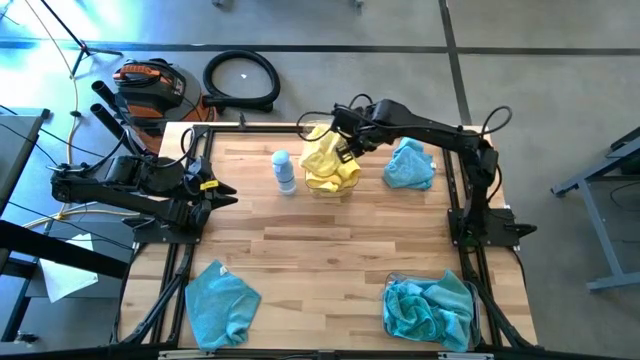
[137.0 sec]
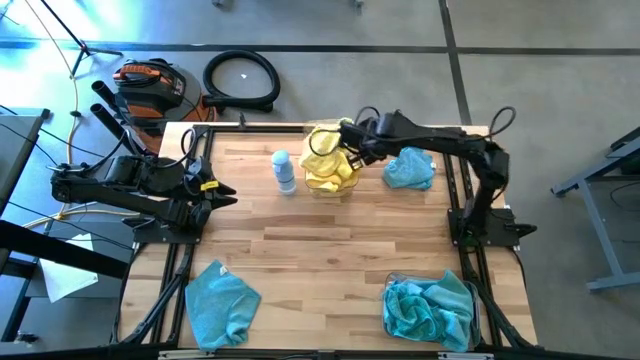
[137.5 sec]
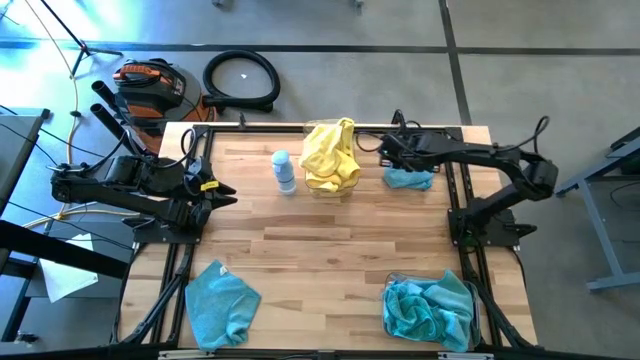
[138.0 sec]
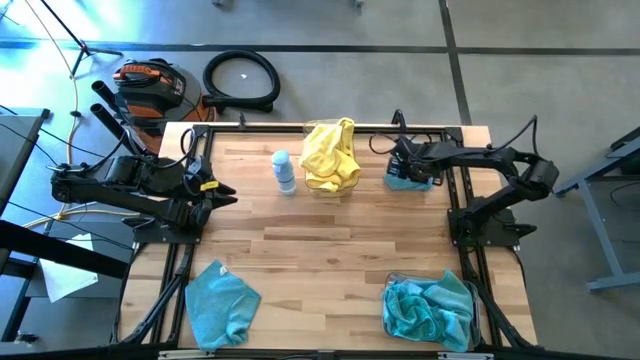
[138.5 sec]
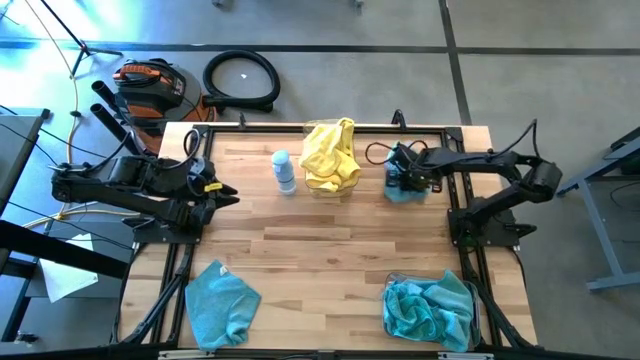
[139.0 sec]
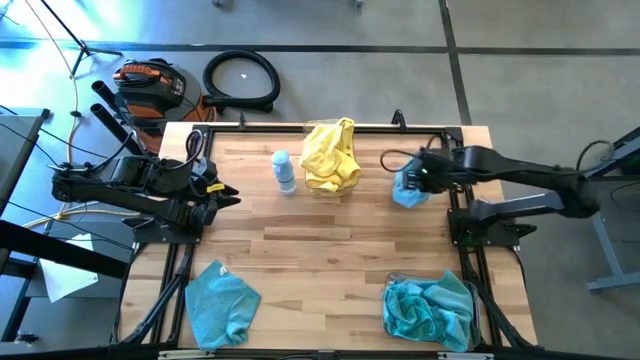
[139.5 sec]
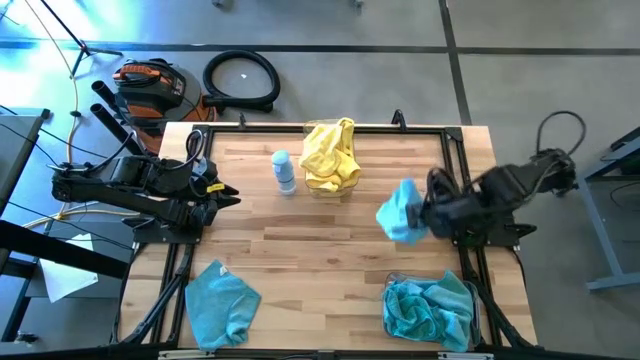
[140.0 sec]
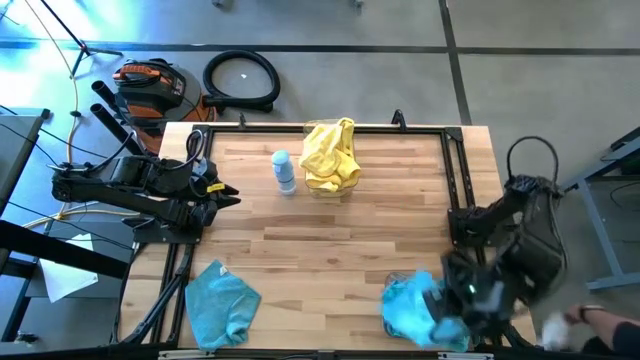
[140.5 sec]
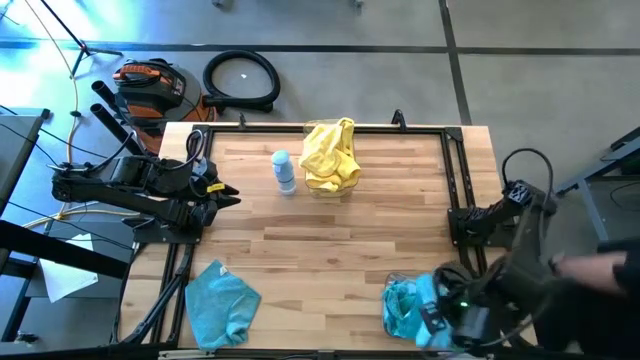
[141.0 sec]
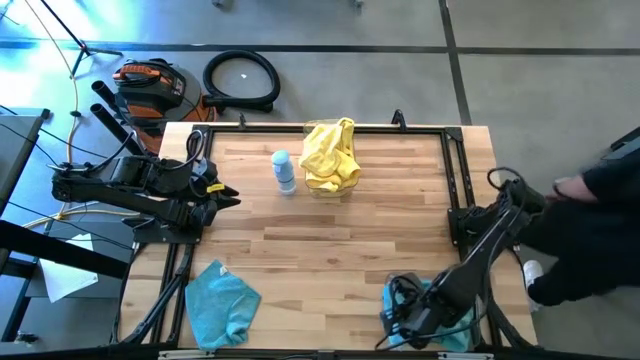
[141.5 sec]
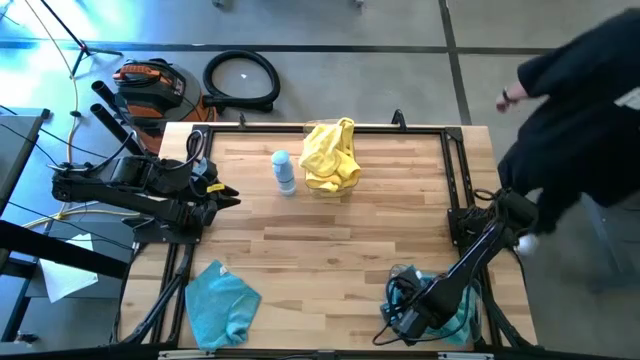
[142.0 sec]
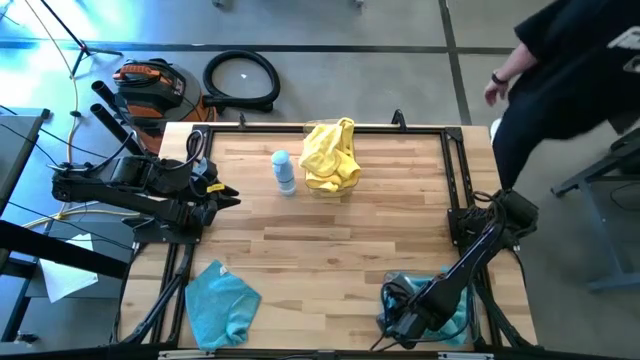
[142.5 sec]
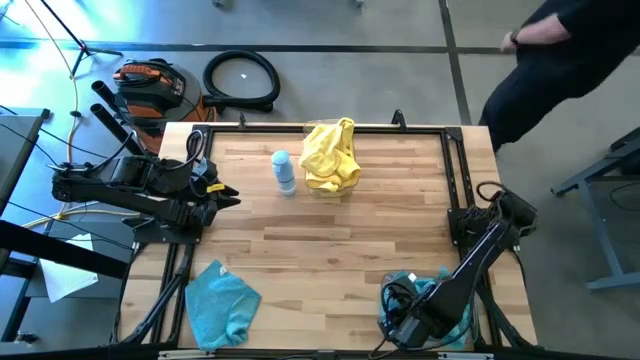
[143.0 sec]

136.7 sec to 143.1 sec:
Task: Sort microfiber towel by color & place in baskets
Put the blue towel into the bottom transparent bin

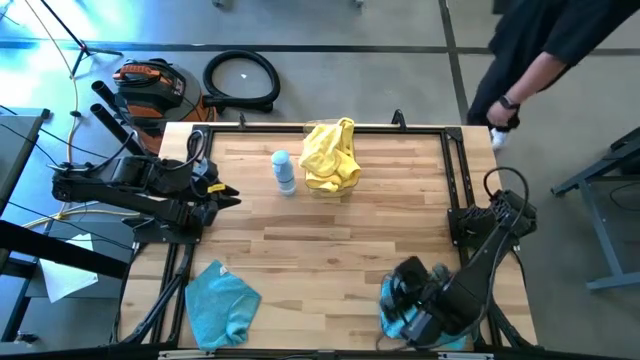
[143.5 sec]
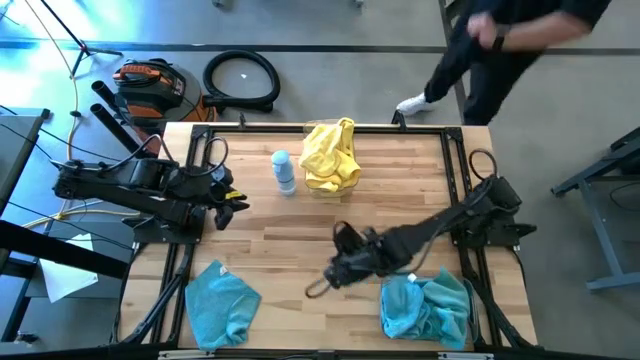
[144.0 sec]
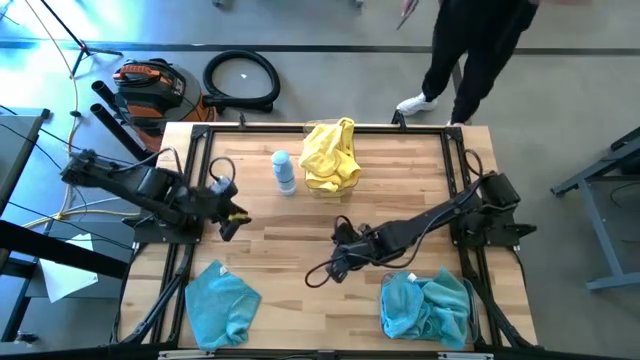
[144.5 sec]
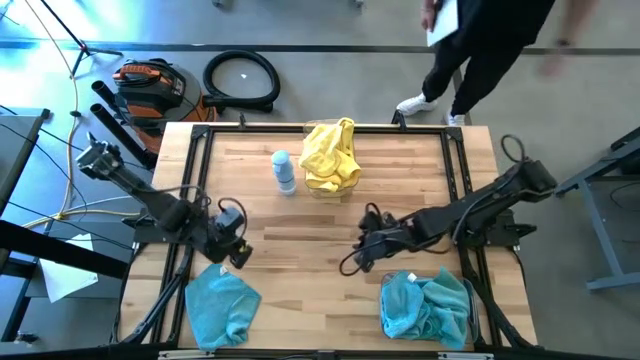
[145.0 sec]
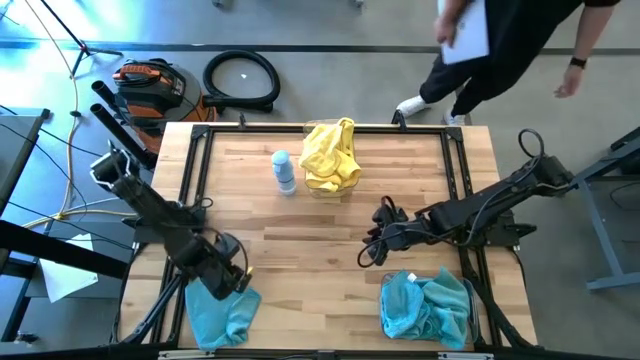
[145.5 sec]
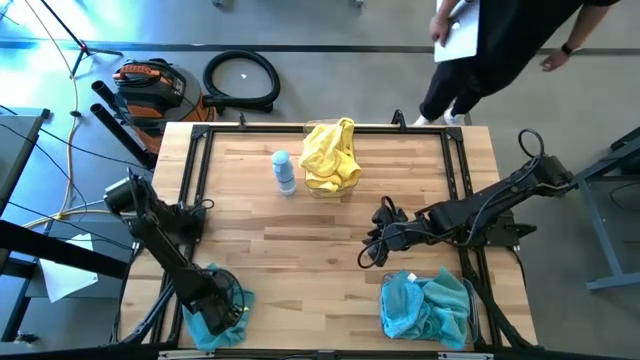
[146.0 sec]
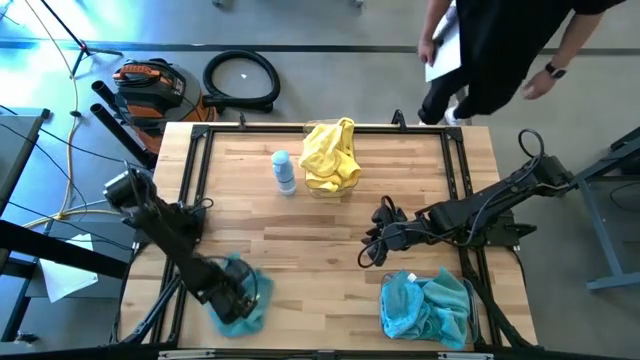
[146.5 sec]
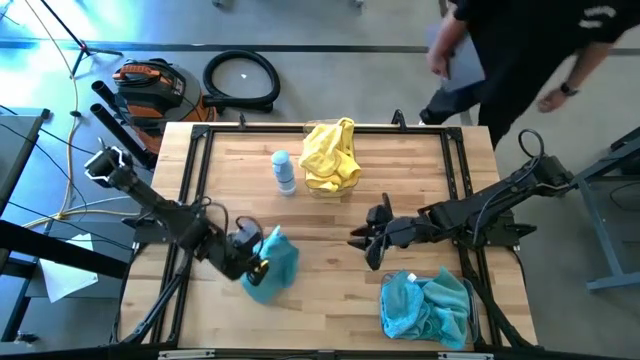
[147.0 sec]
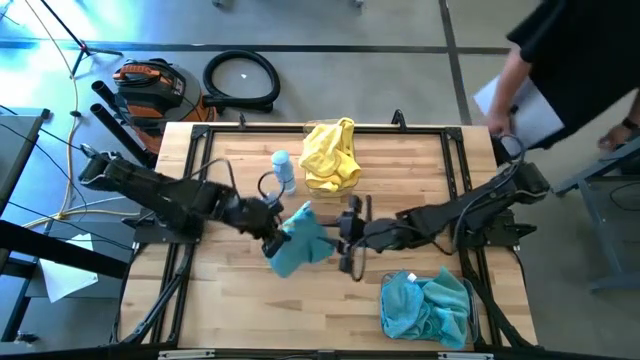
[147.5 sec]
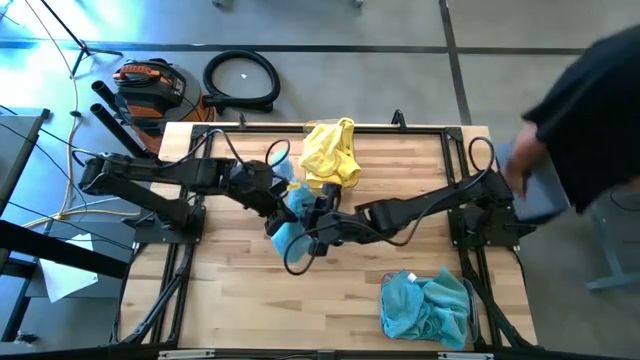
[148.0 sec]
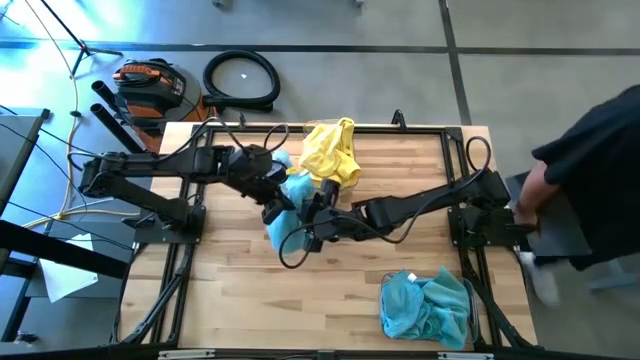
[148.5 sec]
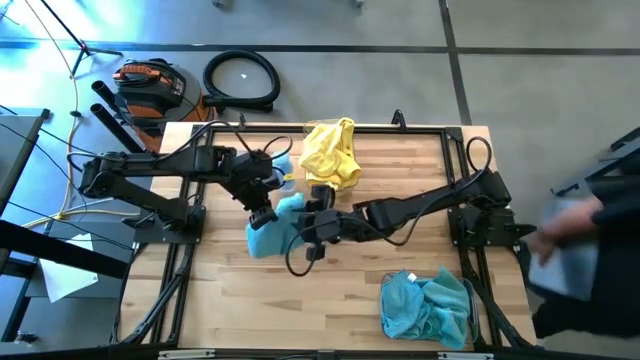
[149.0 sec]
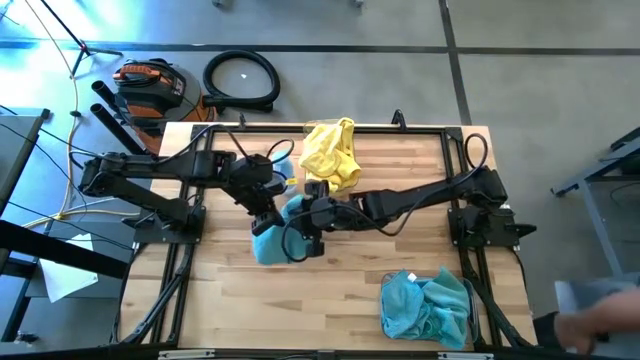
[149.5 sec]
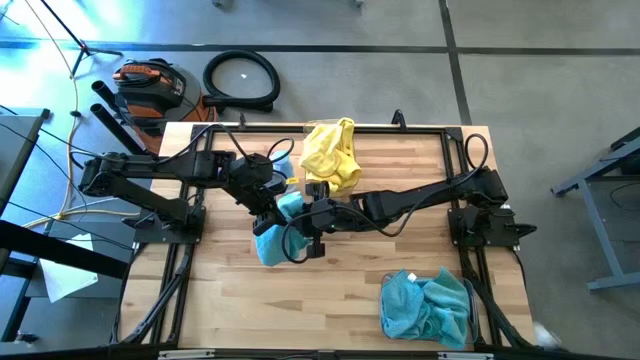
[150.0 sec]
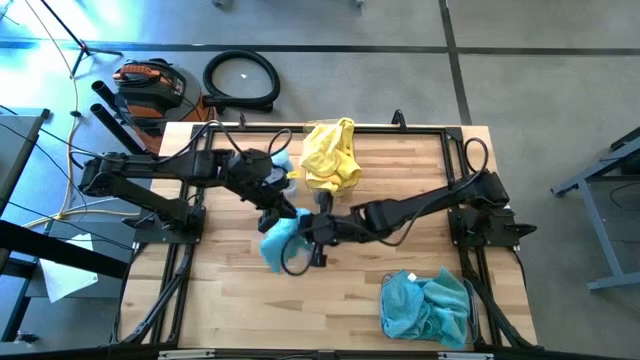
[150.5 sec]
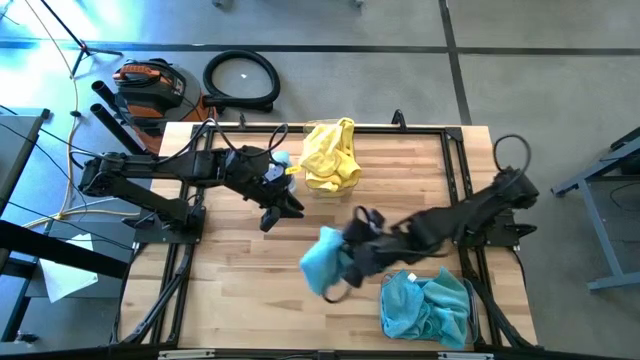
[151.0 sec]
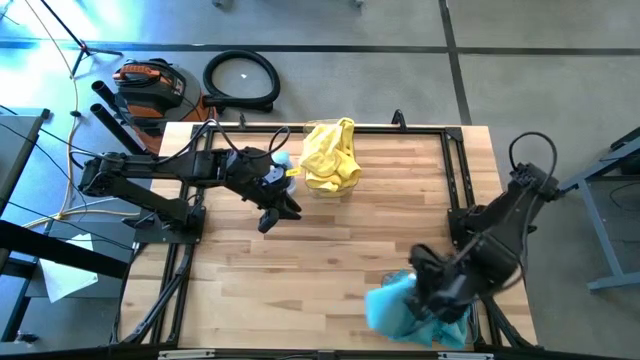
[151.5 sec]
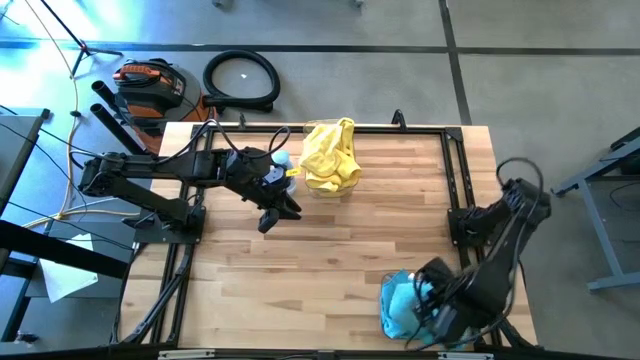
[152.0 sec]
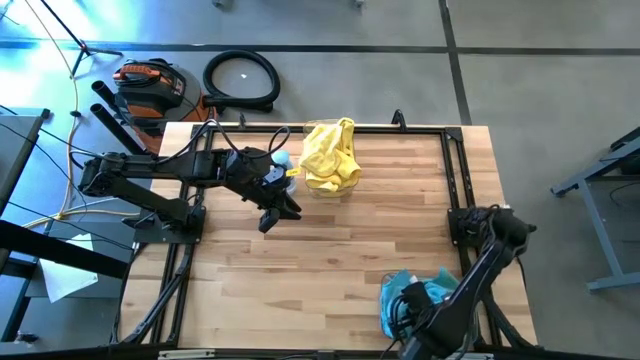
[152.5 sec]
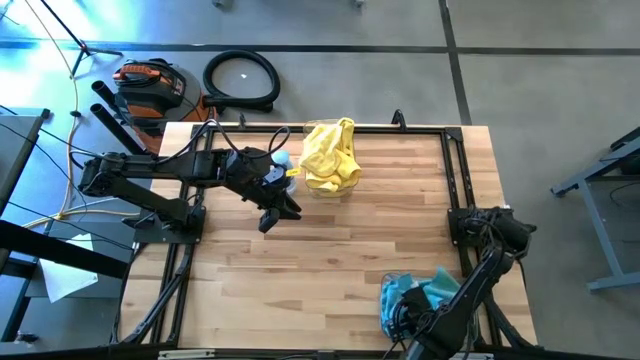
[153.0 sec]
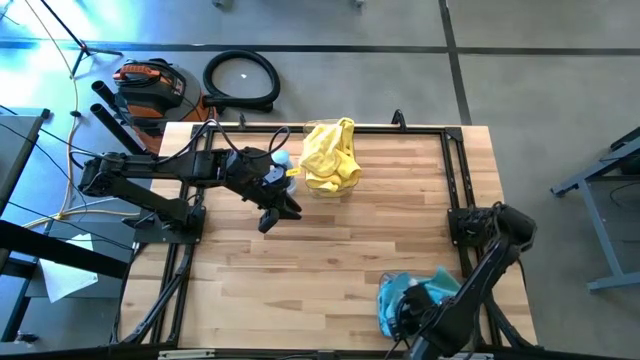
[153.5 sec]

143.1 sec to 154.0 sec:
Put the blue towel into the bottom transparent bin

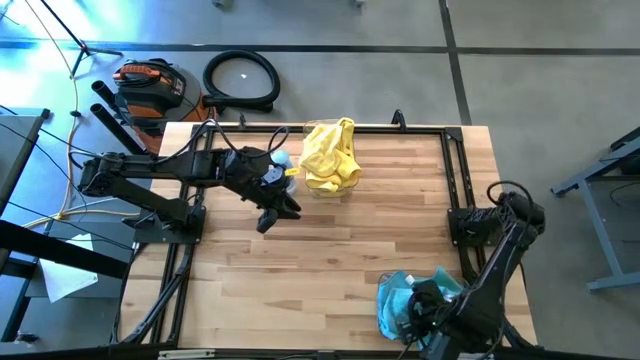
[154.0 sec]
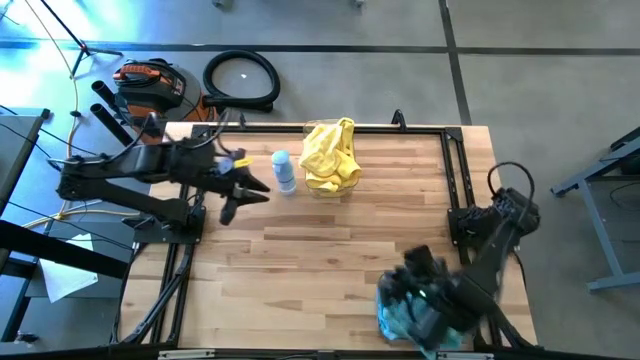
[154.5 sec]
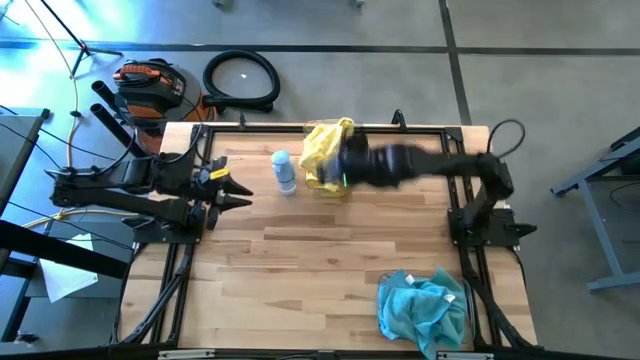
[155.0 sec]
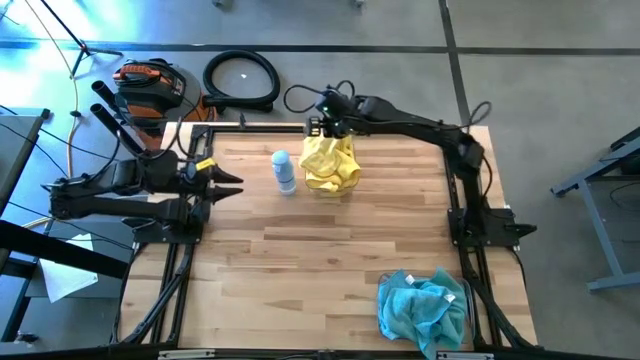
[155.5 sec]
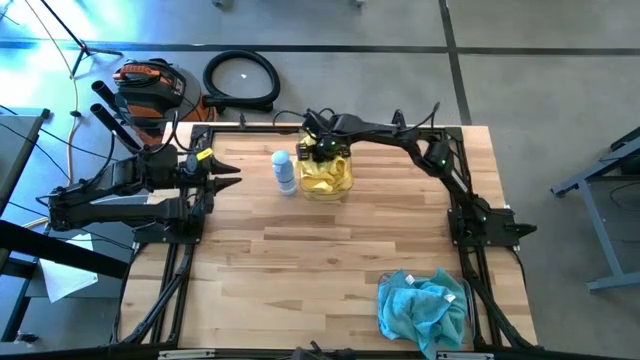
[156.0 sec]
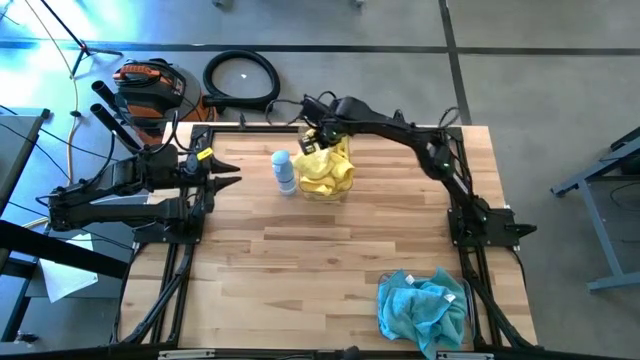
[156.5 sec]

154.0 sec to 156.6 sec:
Adjust the yellow towel
